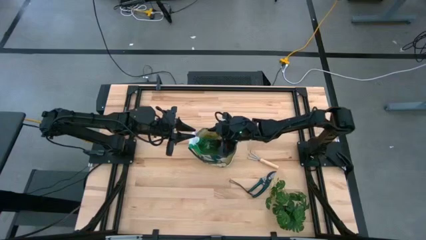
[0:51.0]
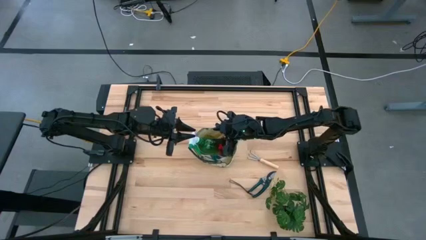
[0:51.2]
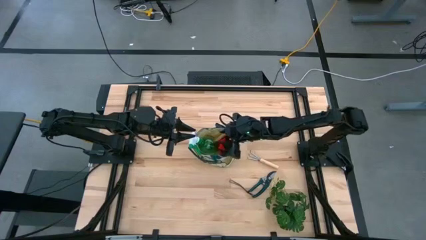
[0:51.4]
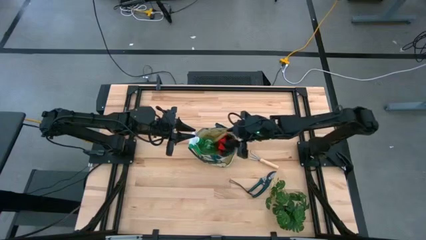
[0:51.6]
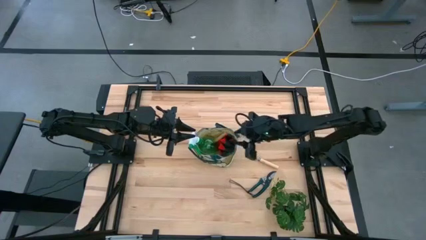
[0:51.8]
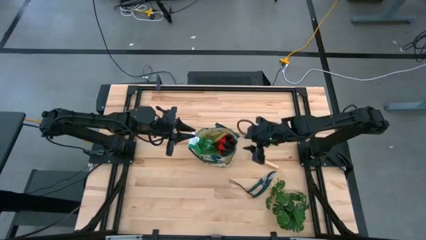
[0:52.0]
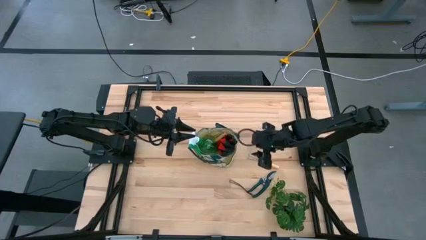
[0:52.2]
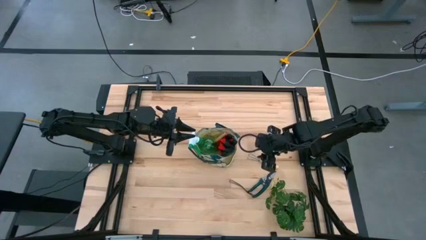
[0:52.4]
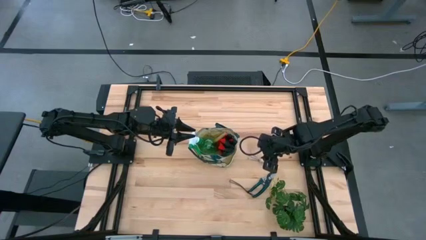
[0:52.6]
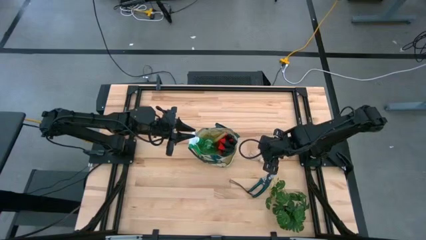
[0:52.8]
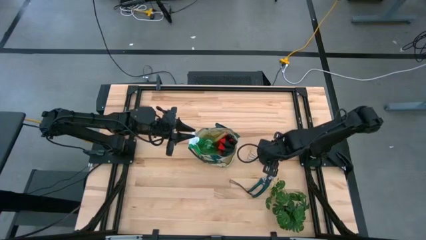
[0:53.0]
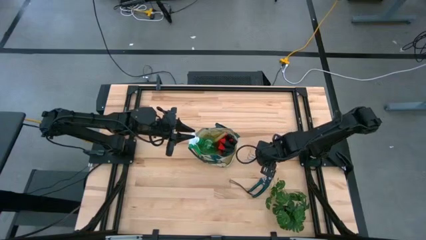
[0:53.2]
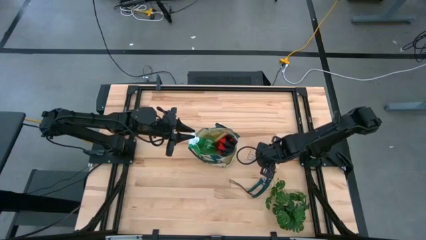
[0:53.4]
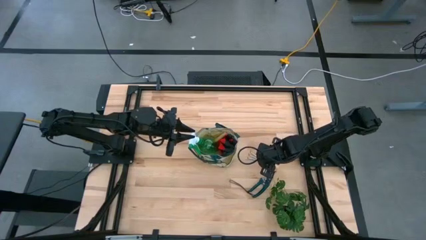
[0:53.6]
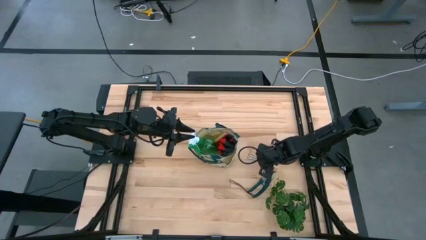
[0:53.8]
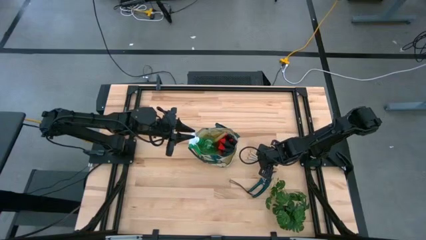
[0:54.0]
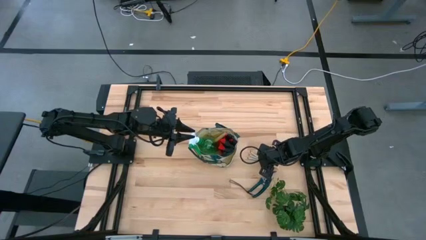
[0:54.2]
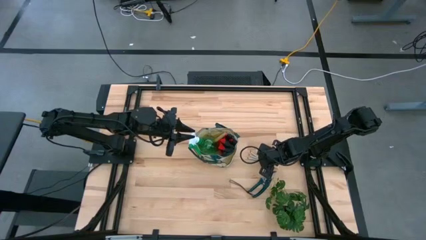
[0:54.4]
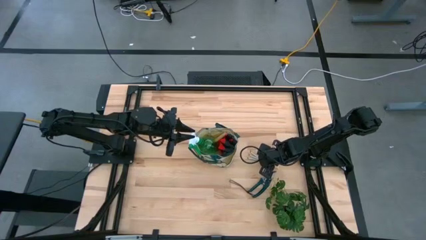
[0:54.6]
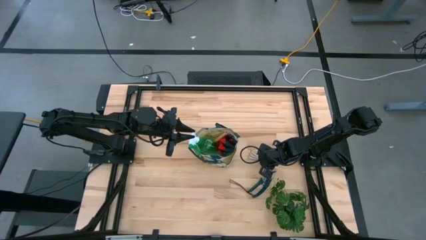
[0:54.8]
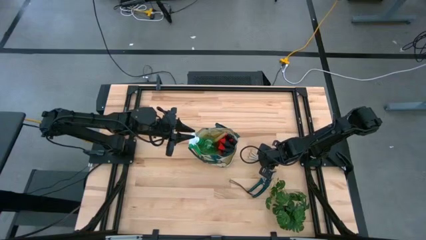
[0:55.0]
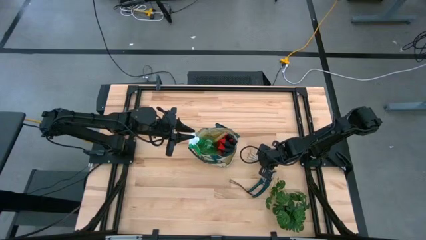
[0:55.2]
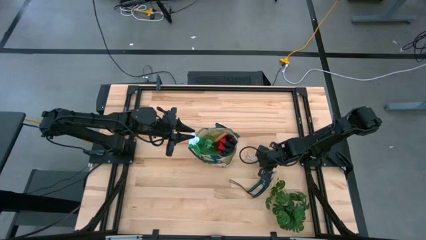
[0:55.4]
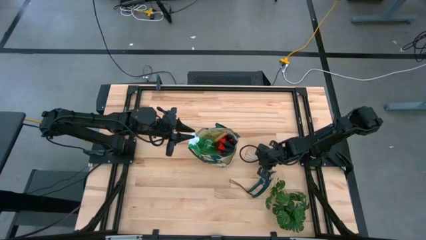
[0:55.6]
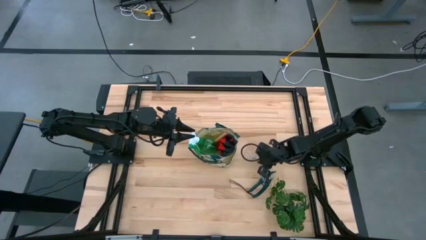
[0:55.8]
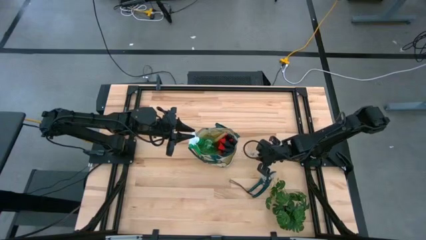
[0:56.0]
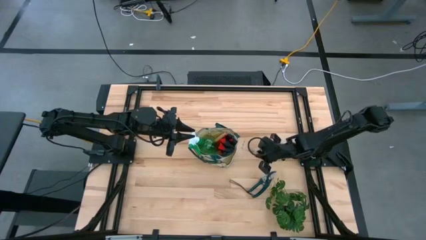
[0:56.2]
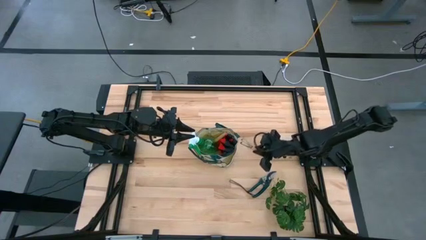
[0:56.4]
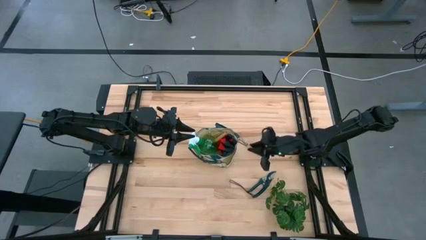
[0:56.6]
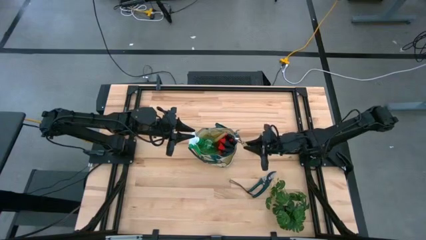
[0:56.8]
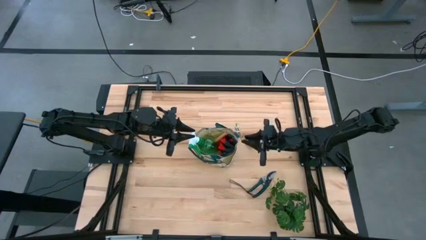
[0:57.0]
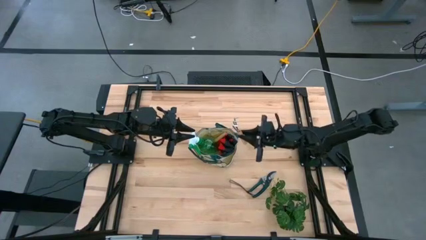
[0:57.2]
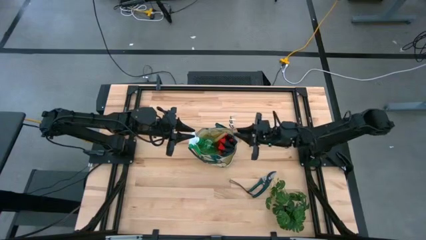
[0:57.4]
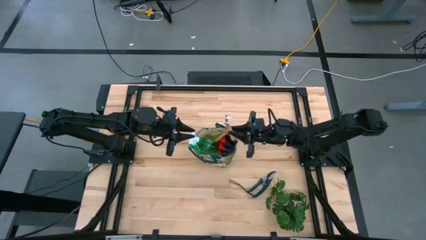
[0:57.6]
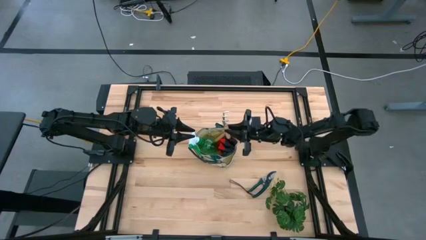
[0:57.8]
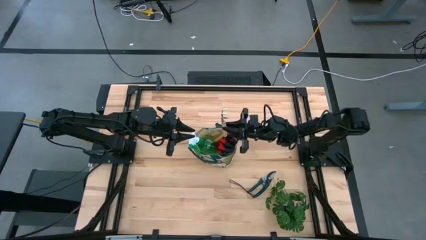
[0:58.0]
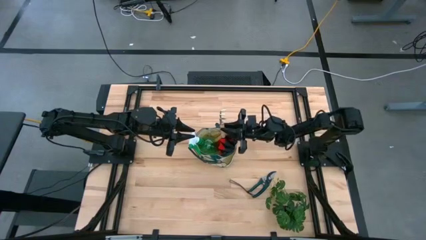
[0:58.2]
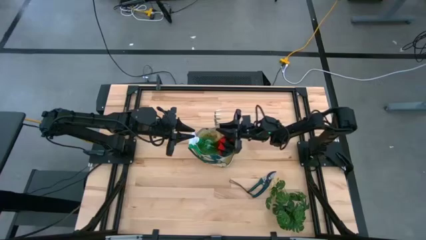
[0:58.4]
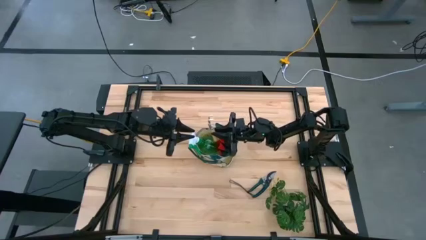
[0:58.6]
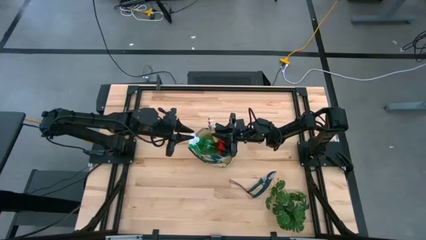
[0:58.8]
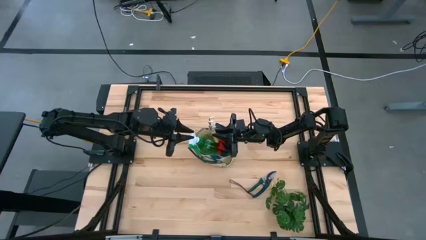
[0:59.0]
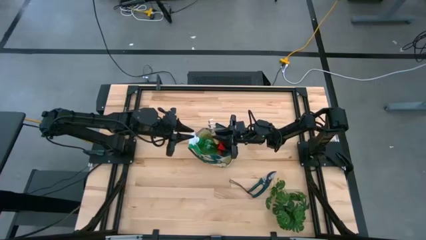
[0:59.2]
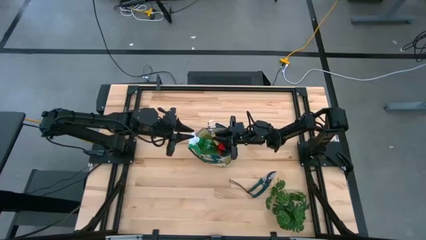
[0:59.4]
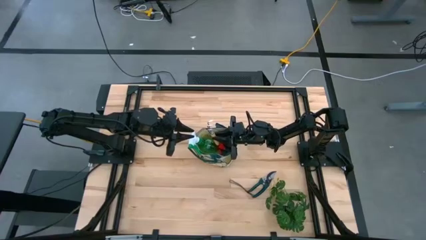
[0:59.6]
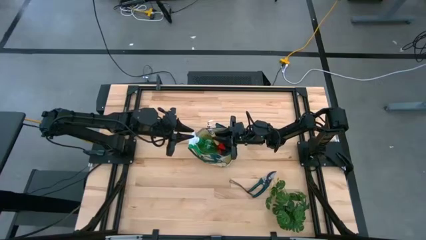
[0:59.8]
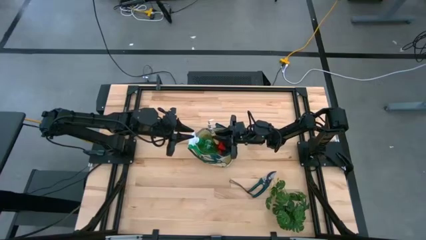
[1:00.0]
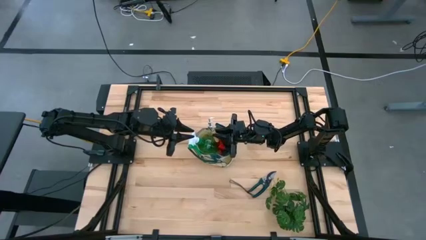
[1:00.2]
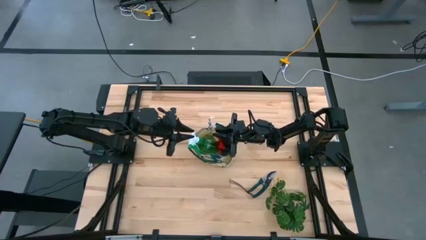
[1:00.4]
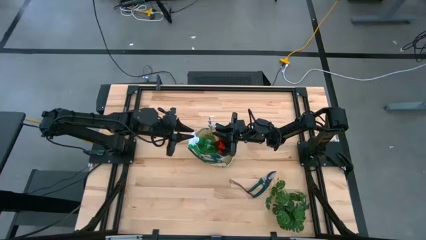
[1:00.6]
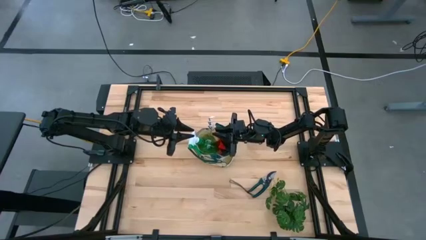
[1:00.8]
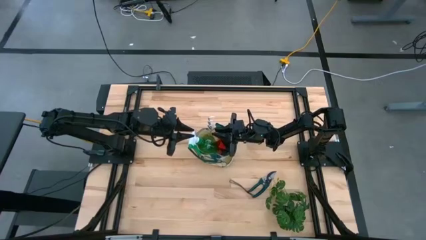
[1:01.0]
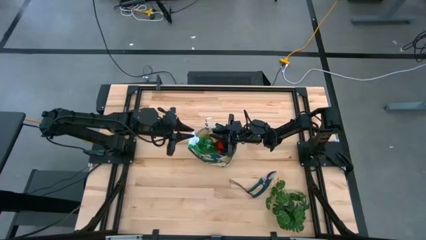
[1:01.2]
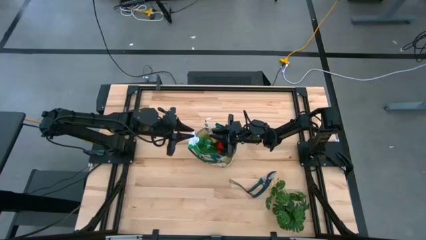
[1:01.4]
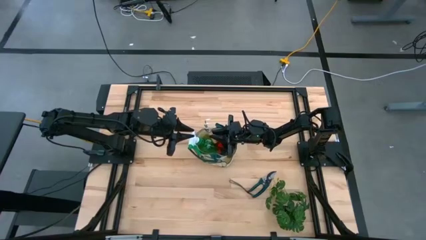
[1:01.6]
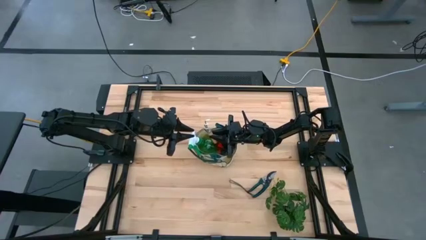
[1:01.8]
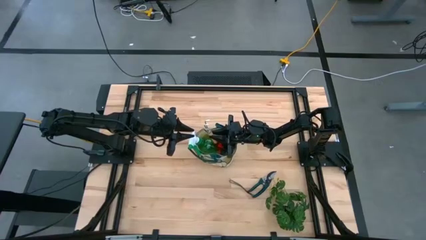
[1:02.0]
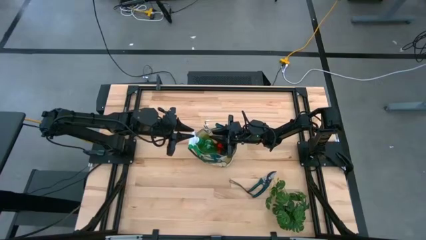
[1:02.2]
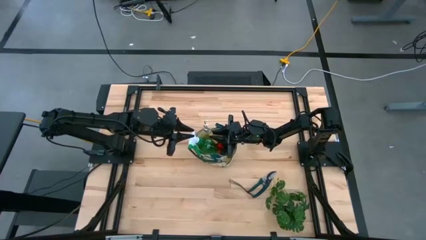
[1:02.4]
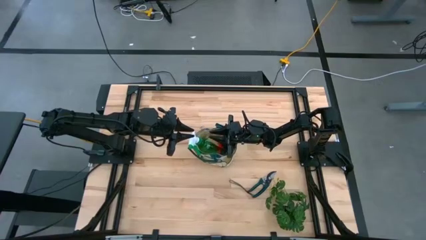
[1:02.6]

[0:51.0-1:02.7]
Task: Pick & Place Garden tools in Gardening bag
Put the brown hand rake into the green gardening bag

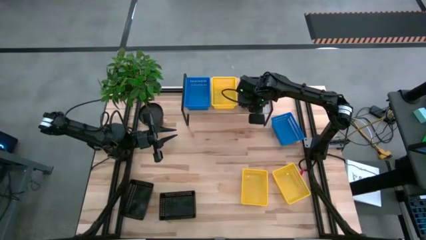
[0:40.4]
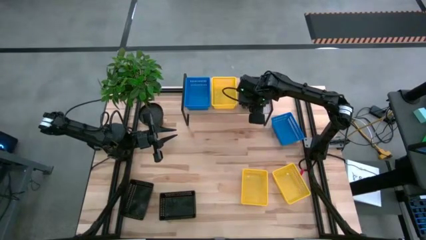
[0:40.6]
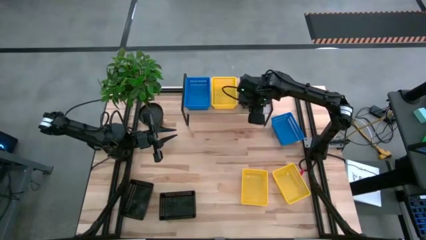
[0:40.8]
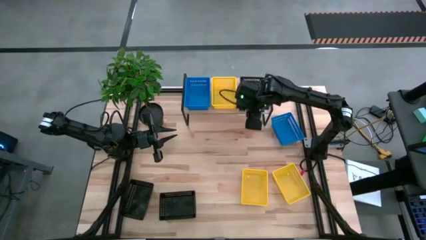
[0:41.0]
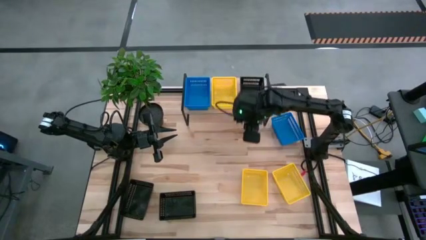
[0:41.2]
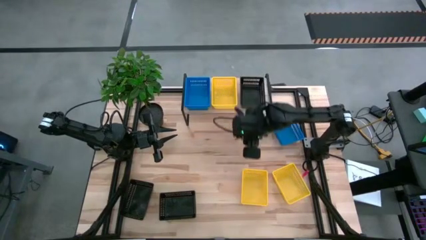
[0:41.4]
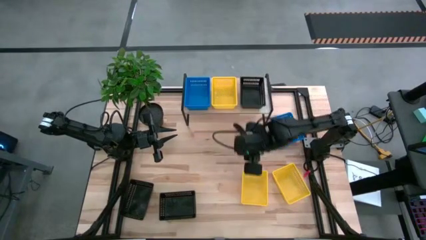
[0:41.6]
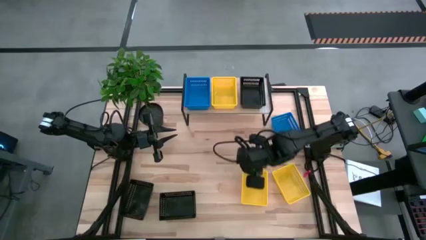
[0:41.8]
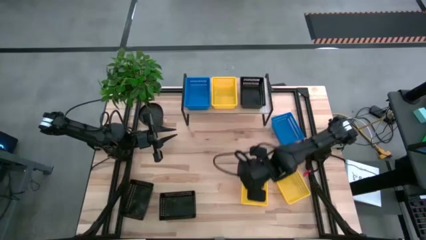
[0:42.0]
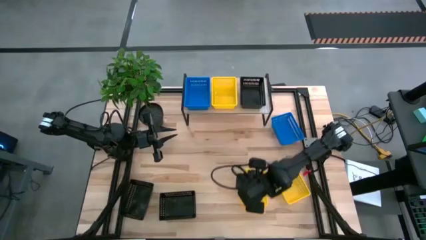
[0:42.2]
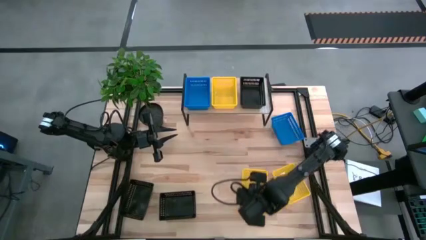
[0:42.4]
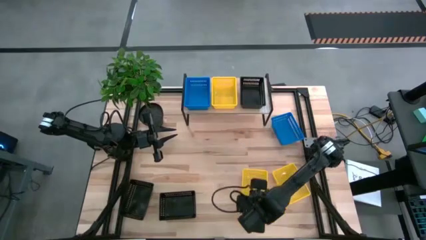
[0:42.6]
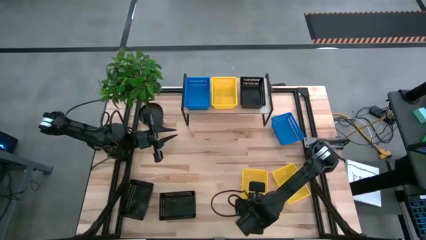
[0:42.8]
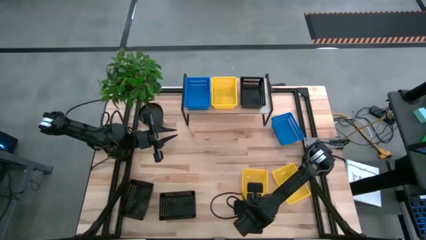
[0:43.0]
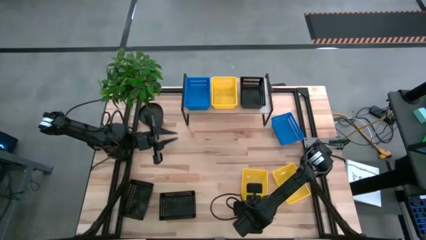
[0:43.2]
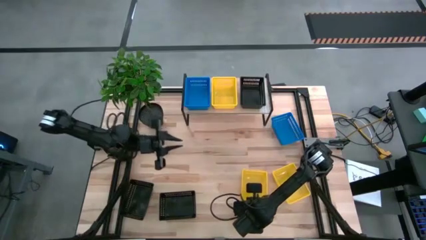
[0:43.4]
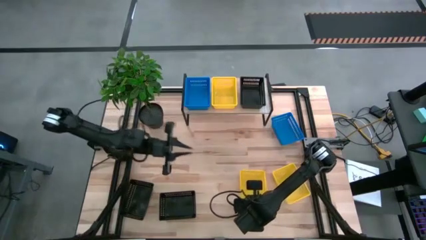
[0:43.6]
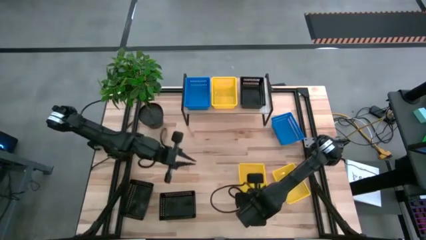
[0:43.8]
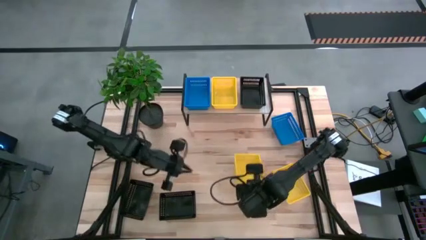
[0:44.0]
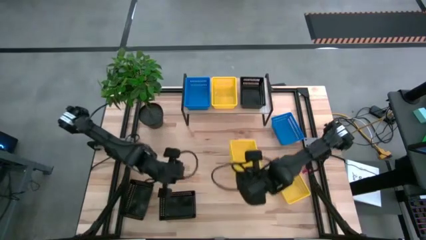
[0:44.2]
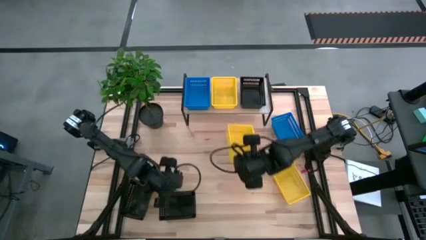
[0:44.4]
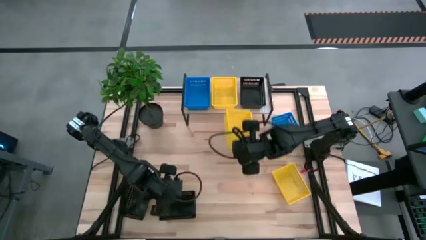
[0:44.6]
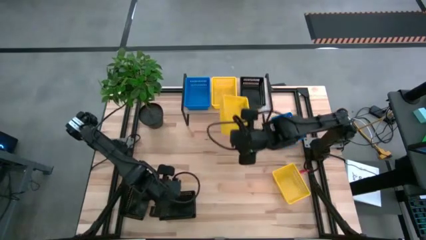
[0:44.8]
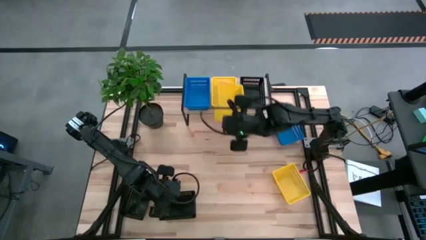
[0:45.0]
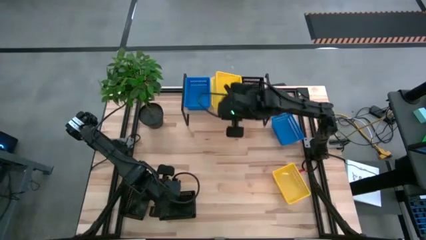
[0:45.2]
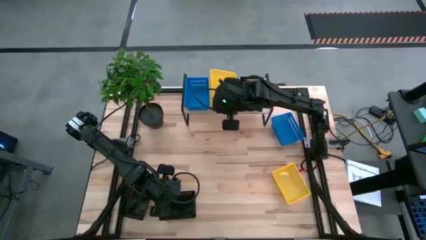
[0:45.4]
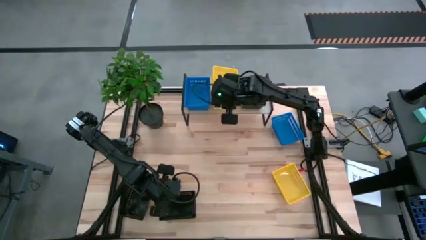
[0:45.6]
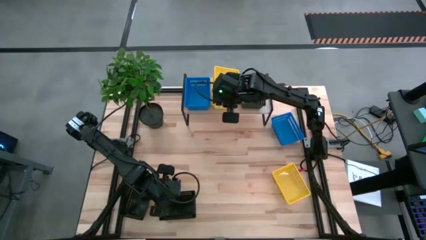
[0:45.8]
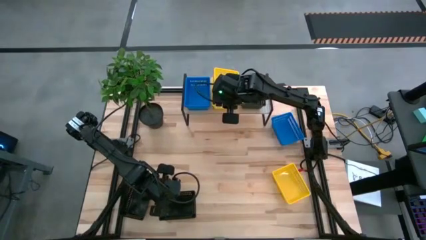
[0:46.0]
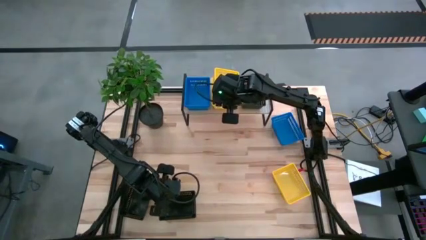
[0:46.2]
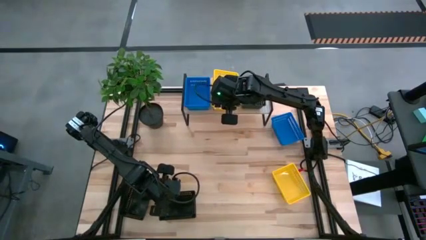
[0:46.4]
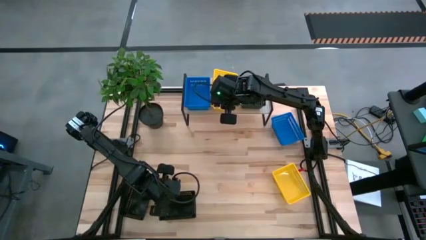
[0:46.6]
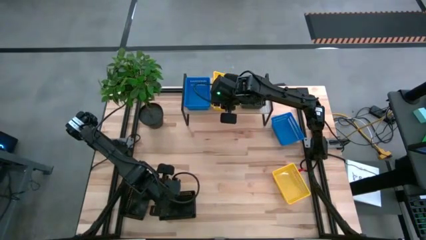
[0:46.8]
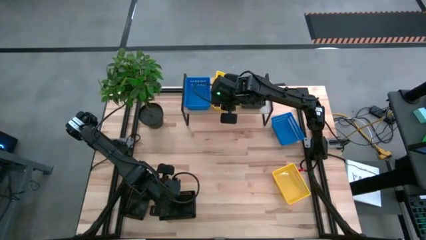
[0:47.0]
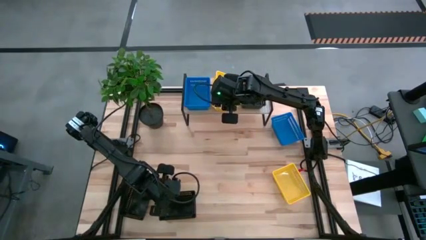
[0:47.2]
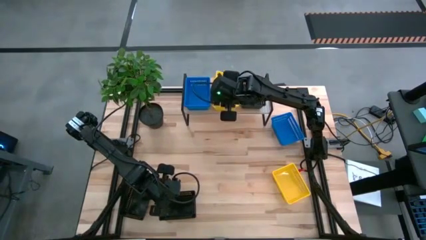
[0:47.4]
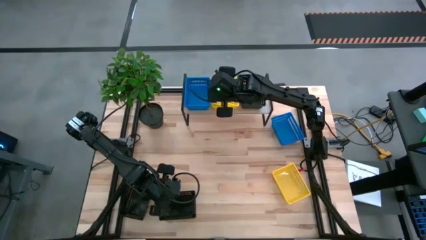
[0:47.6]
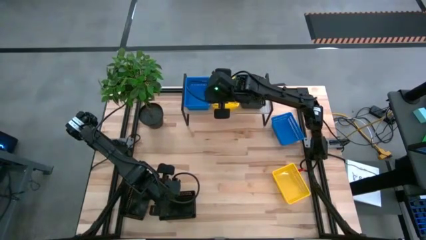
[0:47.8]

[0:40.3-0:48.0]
Task: Stack baskets on shelf by color
Stack the left yellow bin on top of the other yellow bin on the shelf
